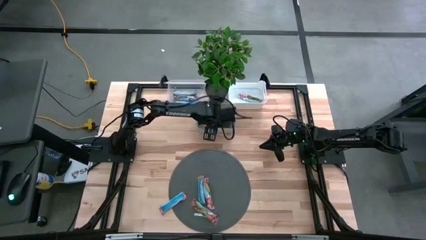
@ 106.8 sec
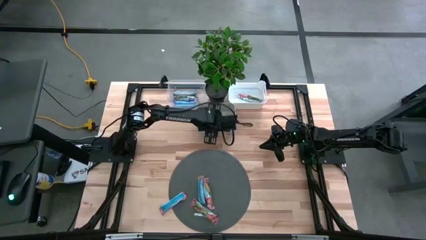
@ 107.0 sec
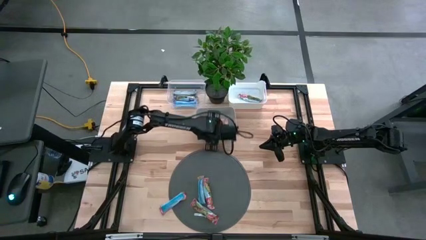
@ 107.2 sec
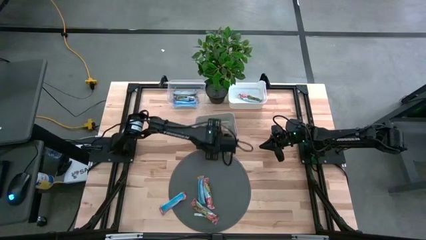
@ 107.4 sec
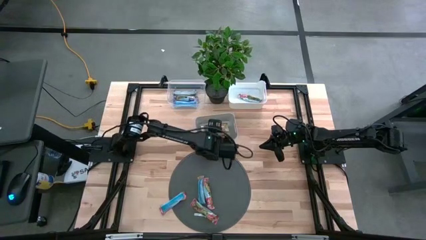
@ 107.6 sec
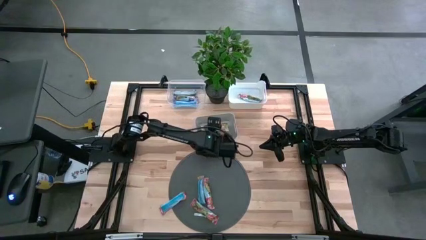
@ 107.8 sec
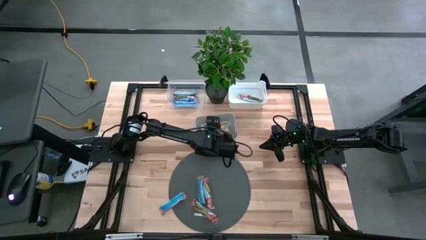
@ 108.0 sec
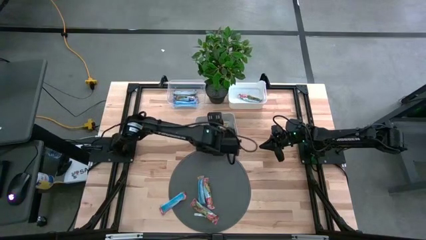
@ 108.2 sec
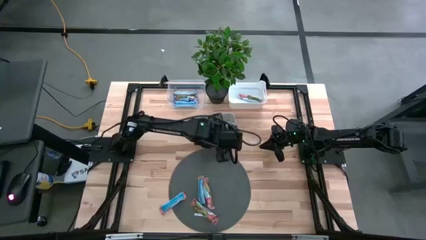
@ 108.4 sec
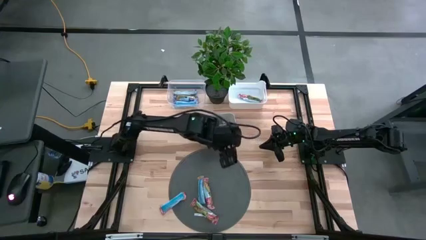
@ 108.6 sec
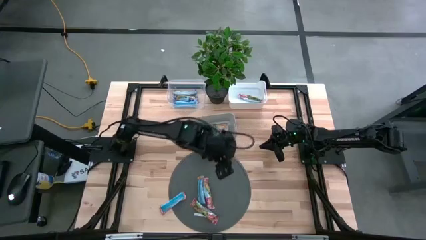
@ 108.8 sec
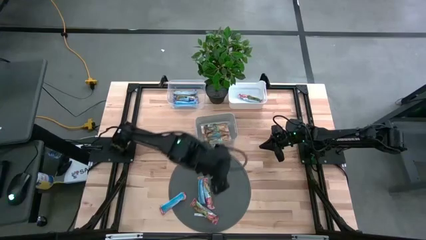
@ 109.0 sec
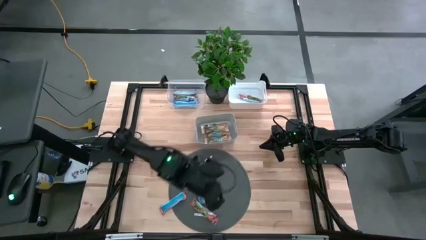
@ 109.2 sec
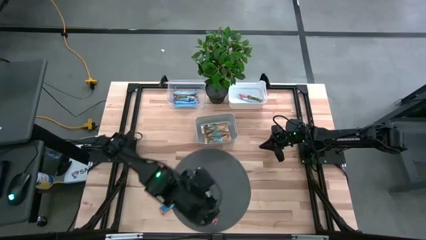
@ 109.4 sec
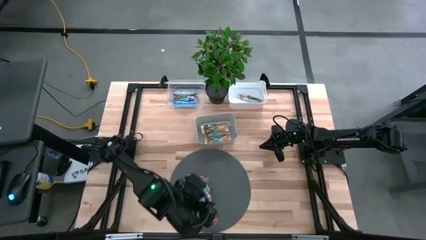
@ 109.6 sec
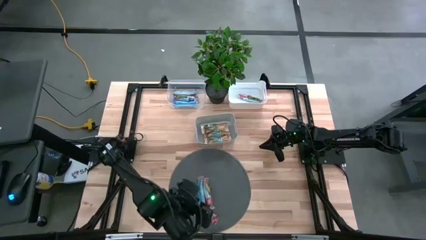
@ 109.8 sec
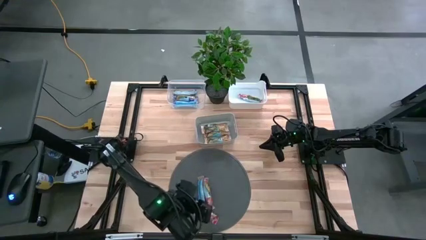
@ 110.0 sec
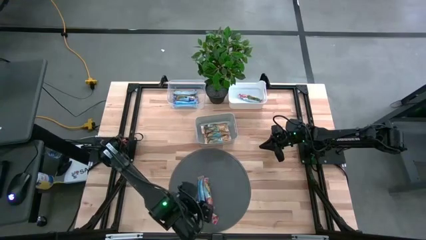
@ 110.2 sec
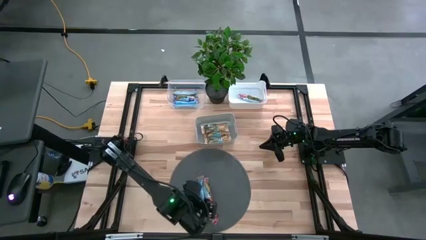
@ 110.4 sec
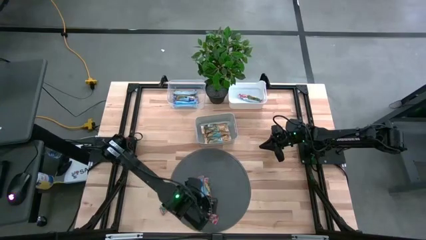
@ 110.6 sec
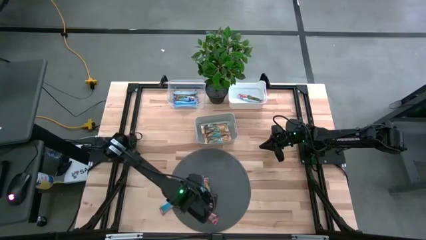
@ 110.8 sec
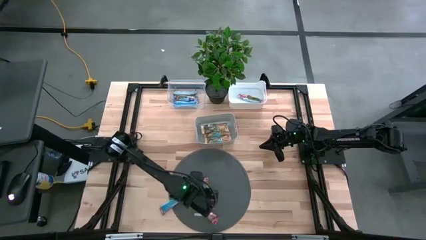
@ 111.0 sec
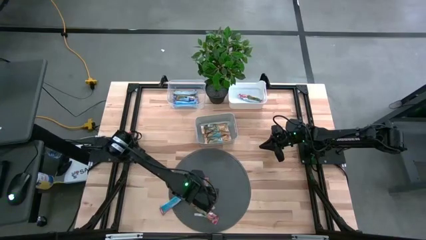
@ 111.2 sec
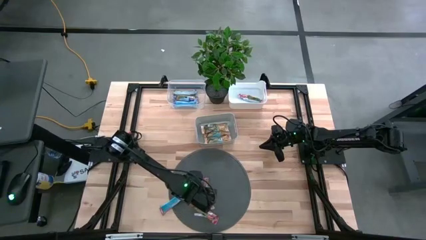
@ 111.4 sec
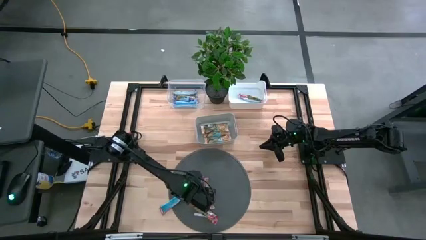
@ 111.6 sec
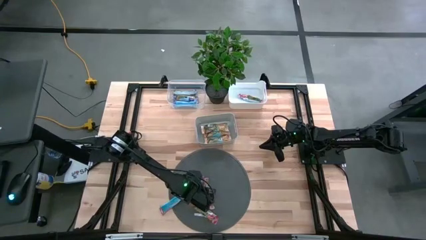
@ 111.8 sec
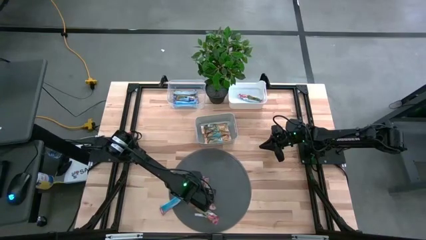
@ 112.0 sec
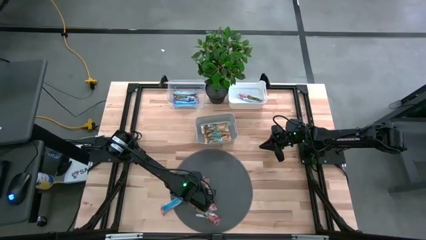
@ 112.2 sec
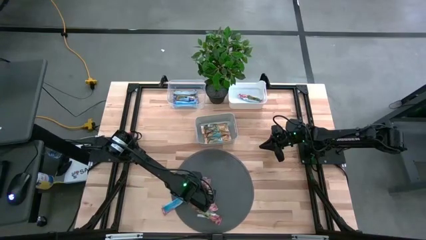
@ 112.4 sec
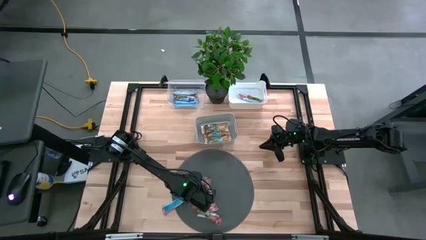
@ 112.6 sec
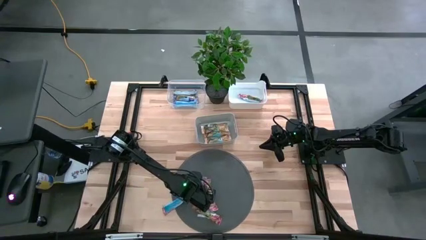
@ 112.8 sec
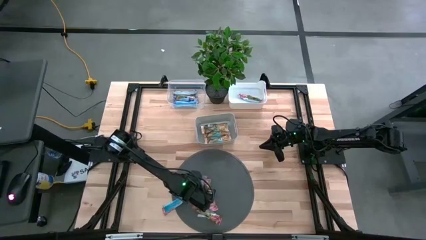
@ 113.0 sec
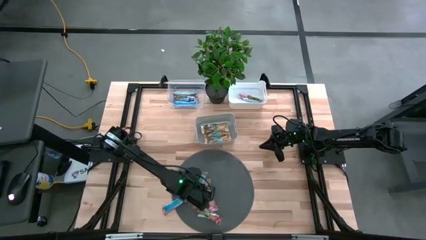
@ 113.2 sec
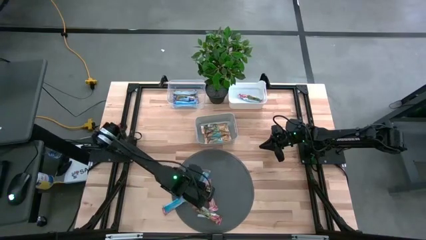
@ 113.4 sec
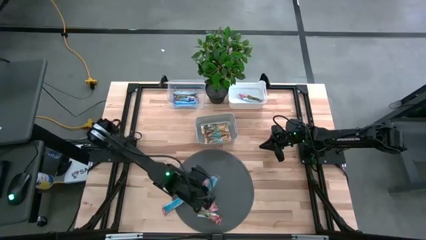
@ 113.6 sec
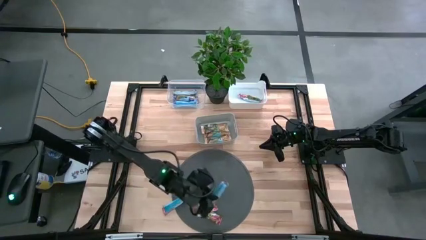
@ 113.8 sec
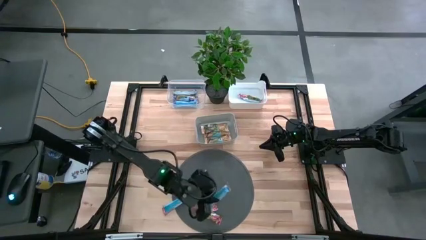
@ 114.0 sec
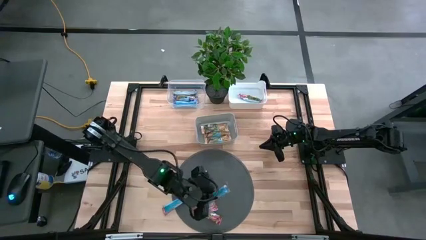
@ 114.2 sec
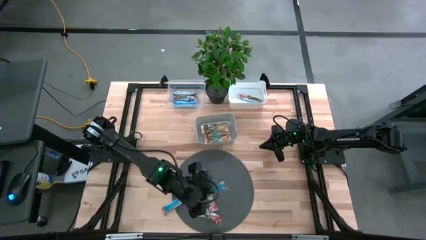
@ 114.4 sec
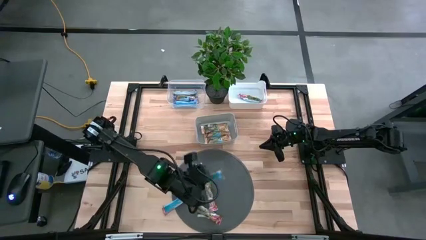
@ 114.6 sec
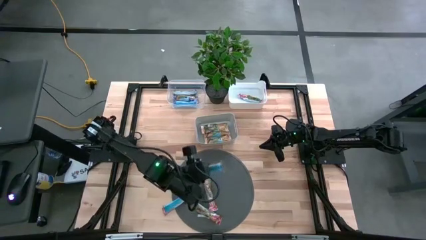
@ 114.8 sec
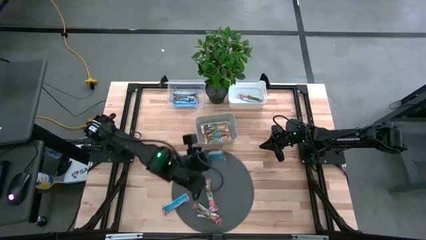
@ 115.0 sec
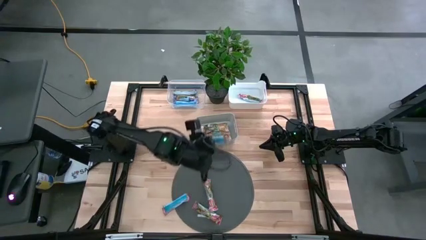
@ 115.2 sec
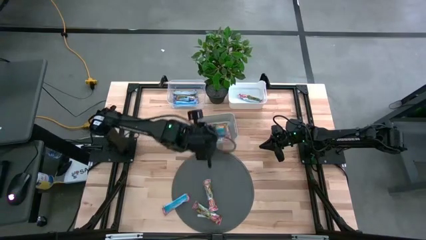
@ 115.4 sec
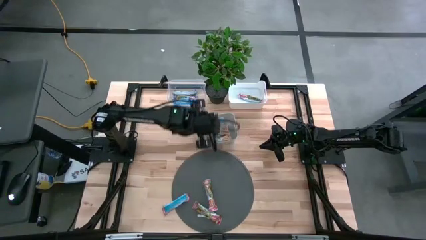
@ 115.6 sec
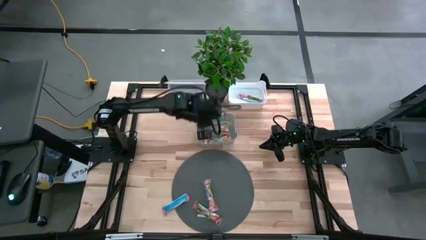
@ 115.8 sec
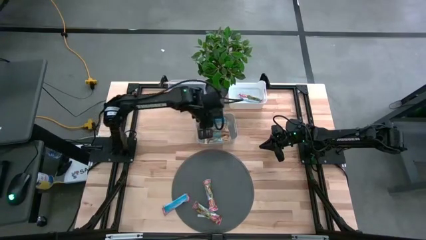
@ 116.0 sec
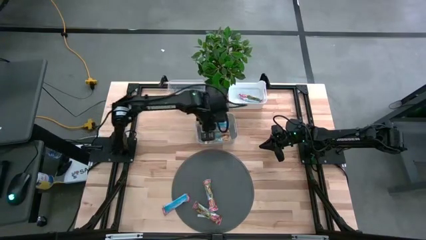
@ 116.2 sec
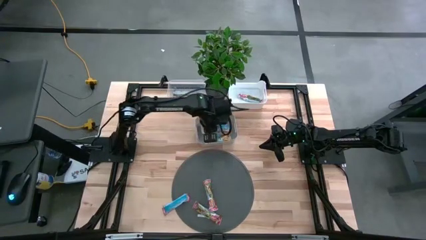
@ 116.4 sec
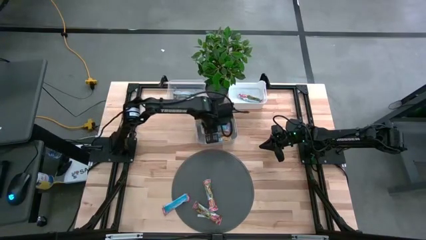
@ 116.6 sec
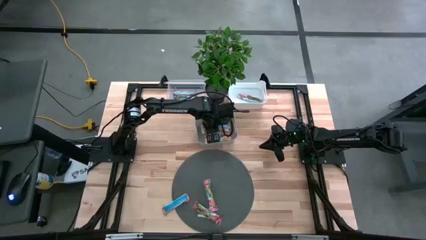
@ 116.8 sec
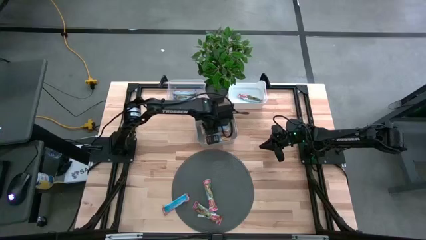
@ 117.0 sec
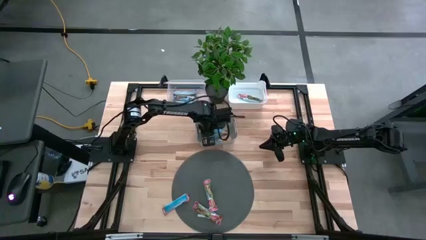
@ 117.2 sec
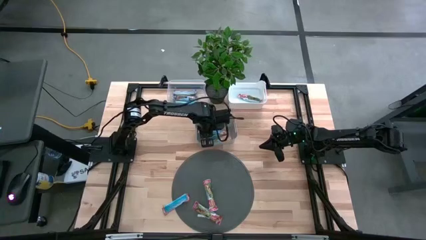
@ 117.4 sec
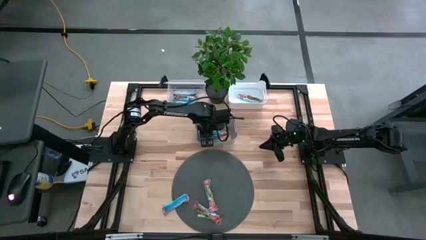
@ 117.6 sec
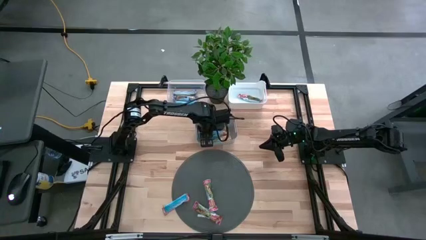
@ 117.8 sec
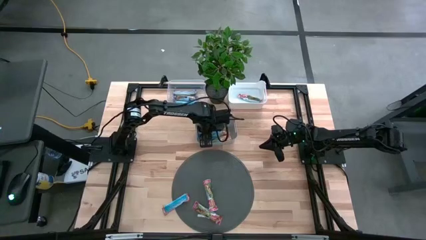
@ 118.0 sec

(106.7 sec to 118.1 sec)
Task: Pick and place Granola Bars by type
Put the orange granola bar into the gray bin

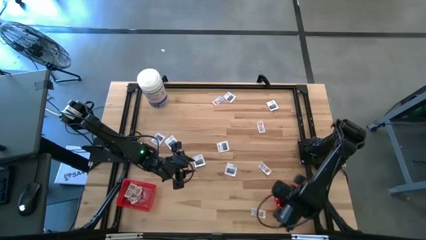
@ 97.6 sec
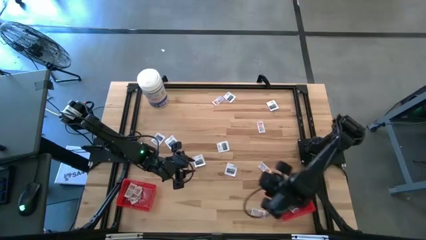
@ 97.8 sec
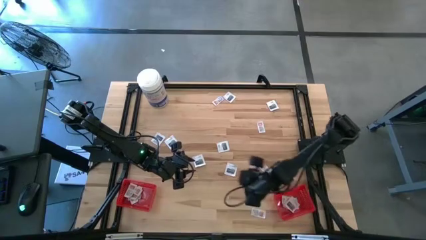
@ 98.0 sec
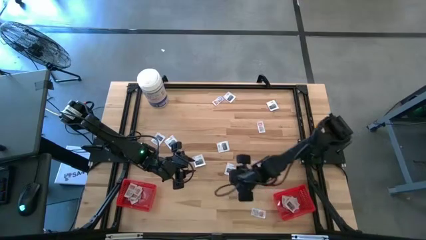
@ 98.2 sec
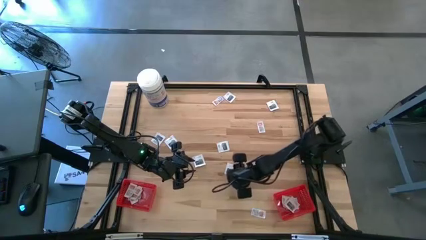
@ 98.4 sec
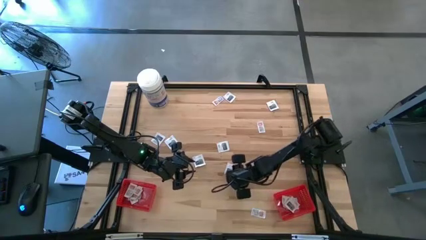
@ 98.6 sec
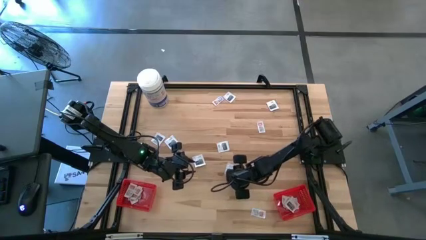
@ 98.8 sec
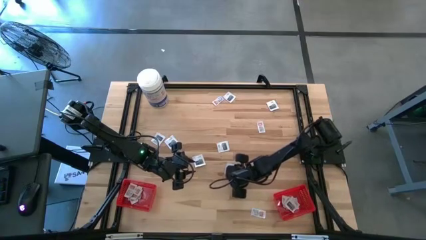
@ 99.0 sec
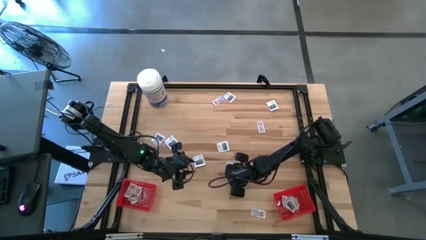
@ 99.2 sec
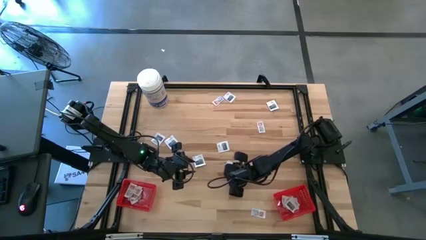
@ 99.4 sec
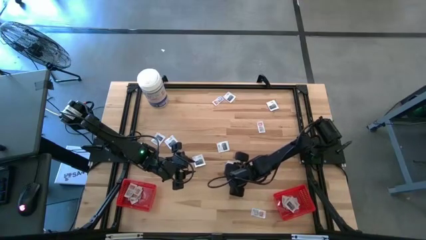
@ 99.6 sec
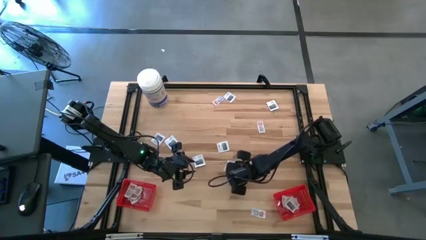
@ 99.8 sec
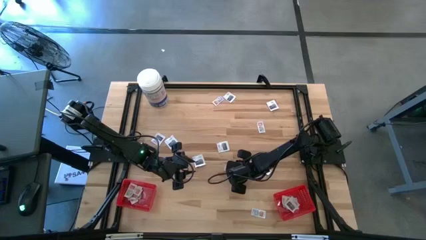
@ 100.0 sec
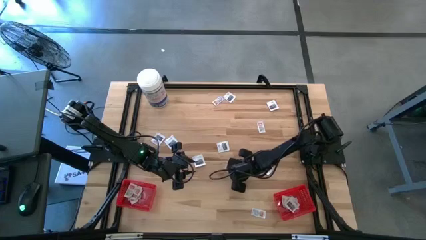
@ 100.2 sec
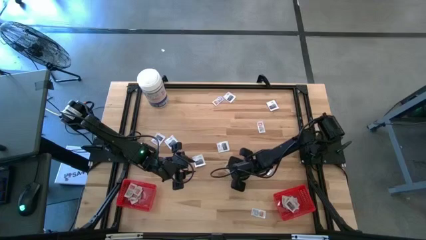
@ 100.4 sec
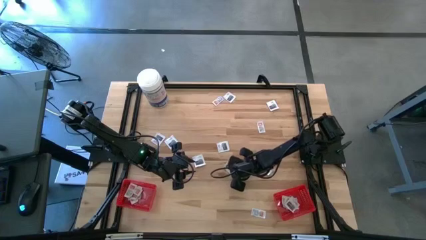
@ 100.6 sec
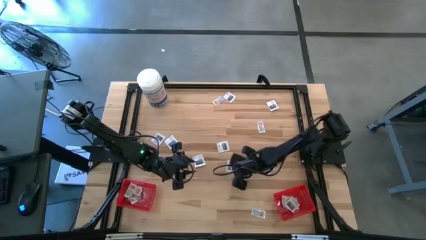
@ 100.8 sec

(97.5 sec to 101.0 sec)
Task: Pick & Place First Aid Supplies
Put the towelette pack into the right red bin
